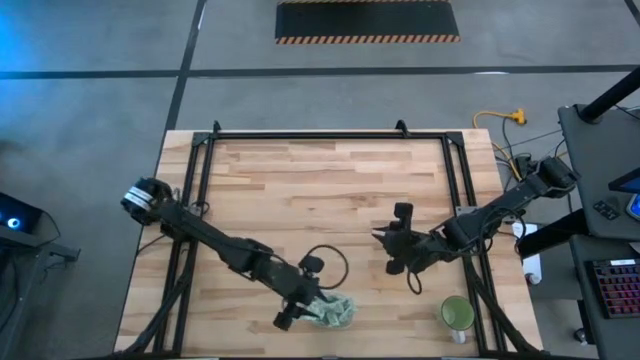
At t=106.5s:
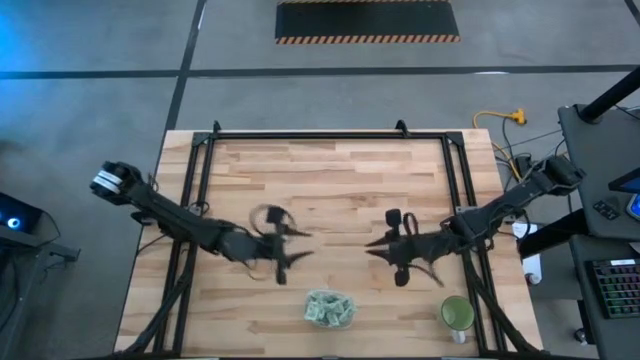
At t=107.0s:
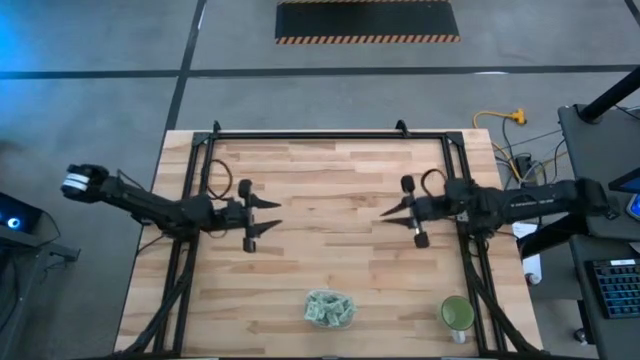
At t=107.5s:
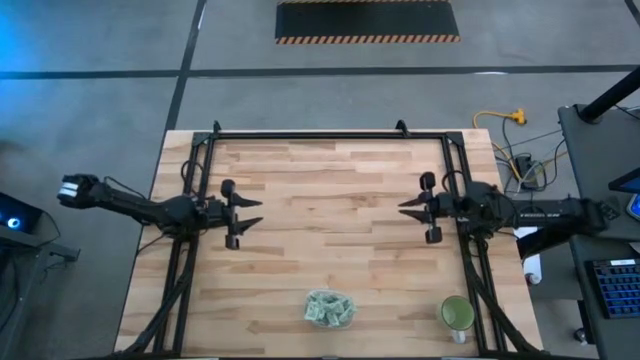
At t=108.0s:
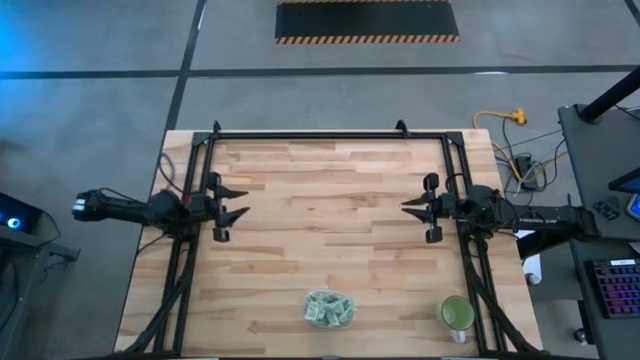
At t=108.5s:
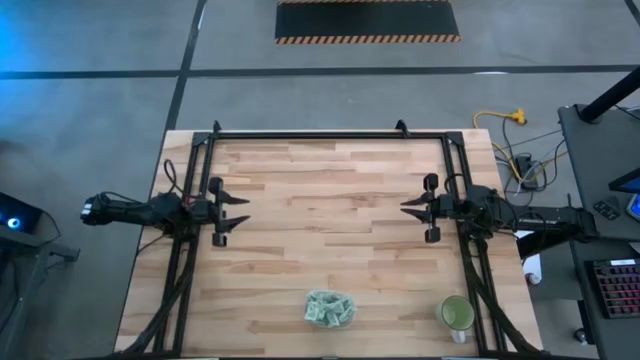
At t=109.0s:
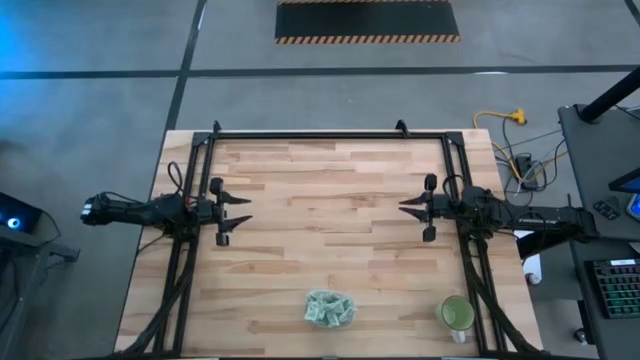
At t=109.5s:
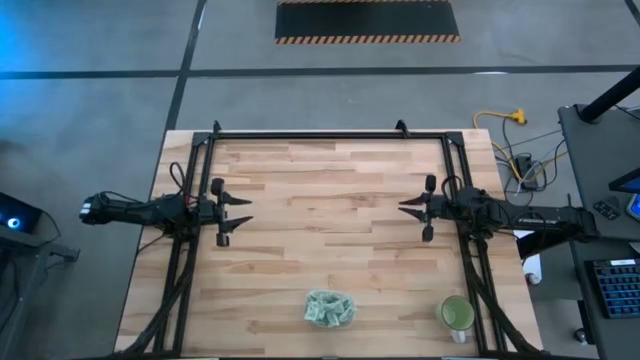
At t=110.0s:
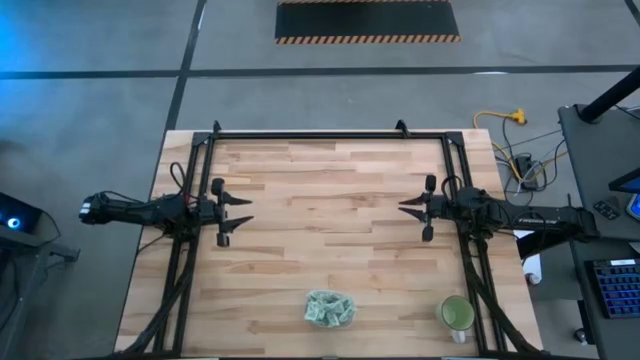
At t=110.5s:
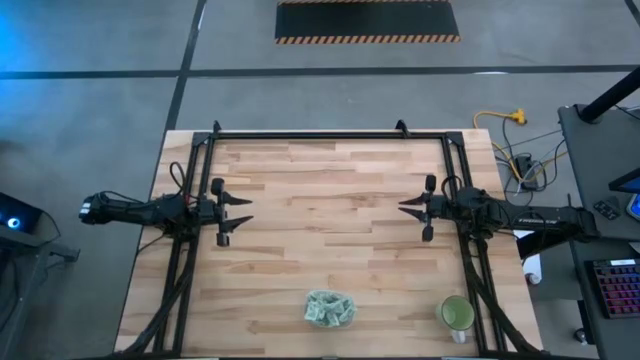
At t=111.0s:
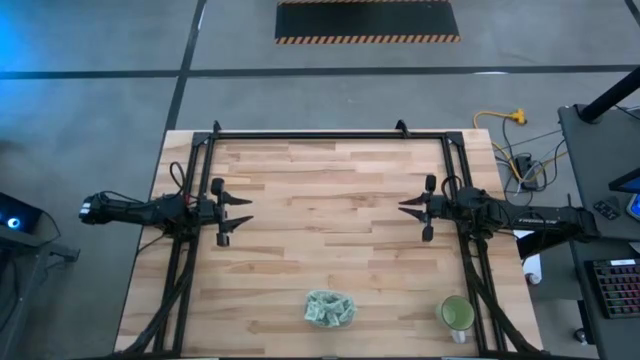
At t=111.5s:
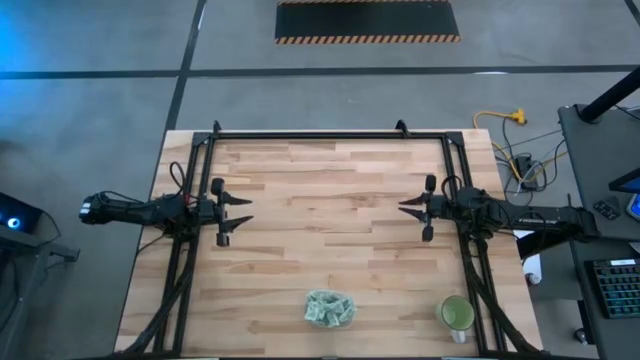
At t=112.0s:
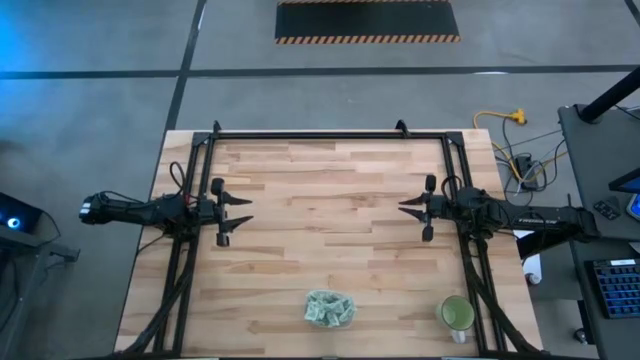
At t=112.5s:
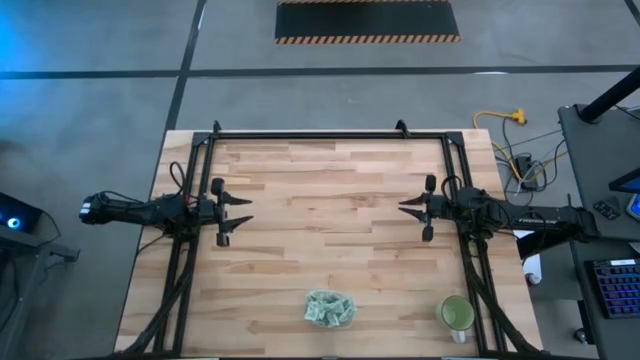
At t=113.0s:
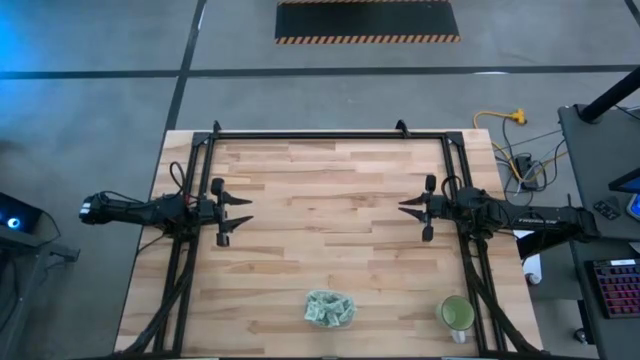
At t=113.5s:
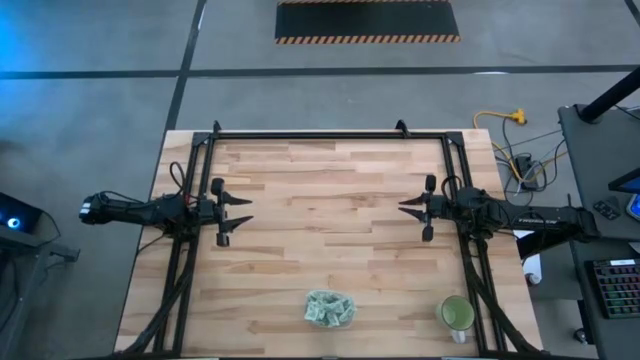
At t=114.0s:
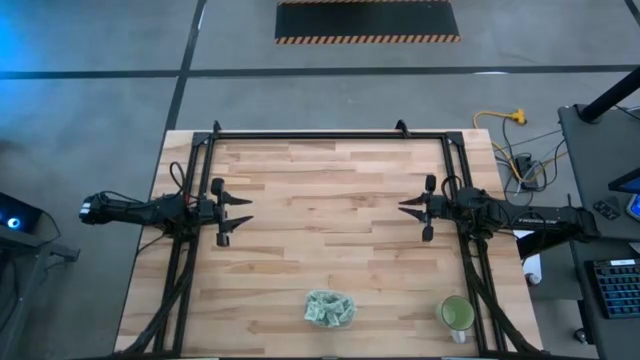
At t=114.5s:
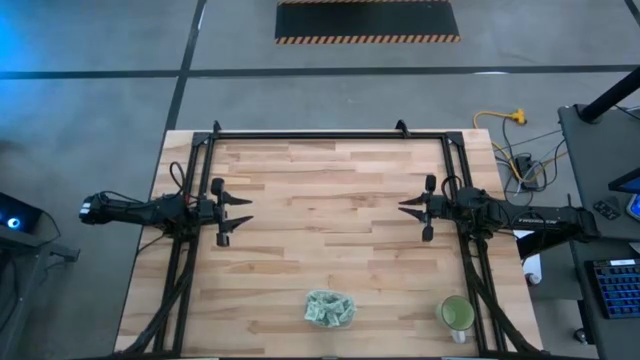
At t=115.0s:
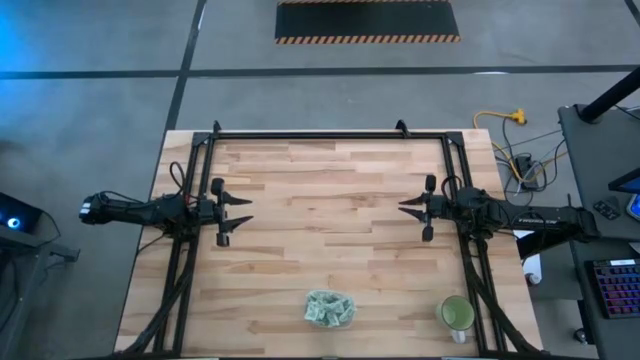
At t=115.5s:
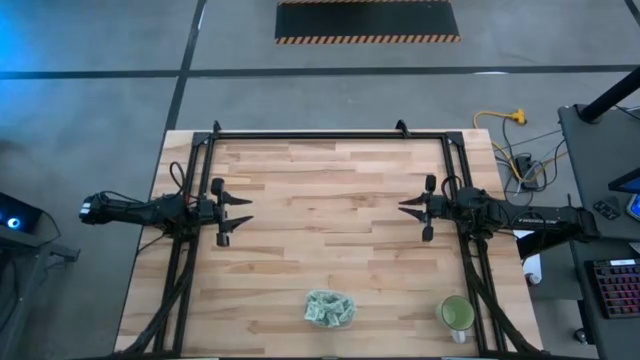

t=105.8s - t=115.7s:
Task: Pick and place Stevia / Truvia into bins
Return to Home Position

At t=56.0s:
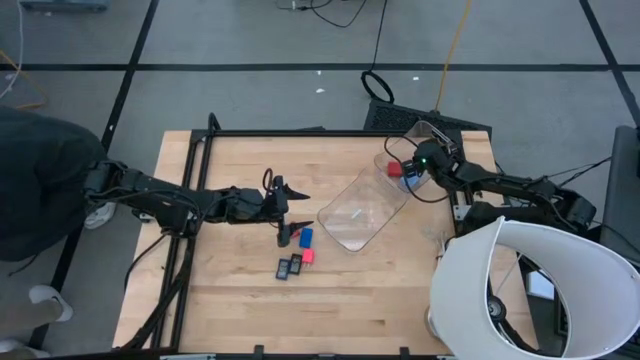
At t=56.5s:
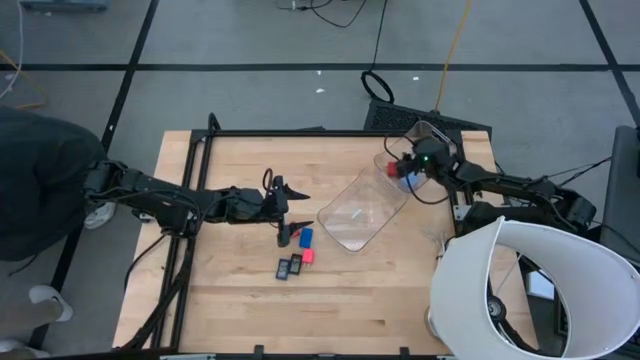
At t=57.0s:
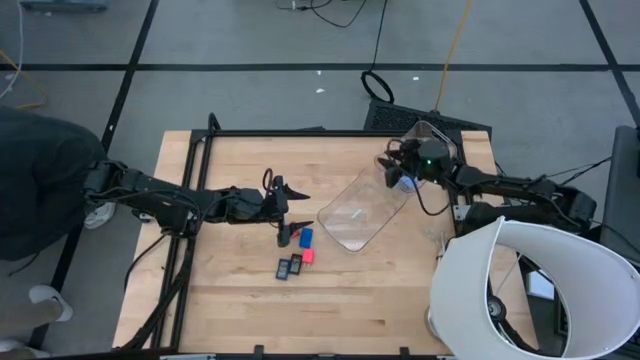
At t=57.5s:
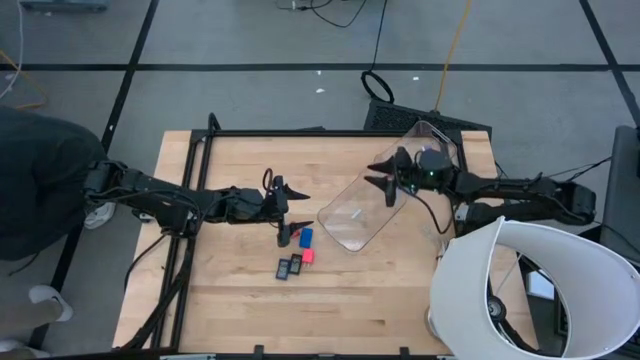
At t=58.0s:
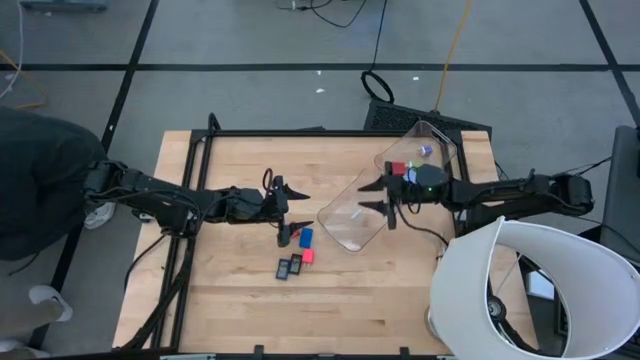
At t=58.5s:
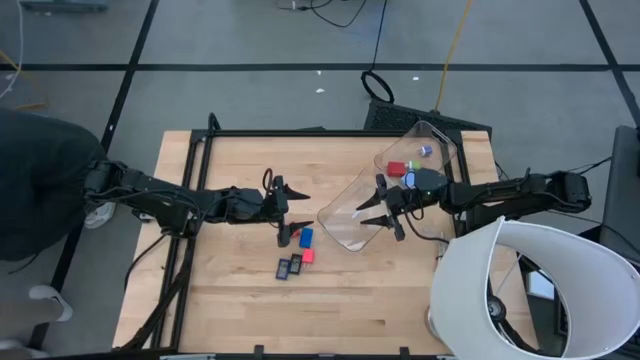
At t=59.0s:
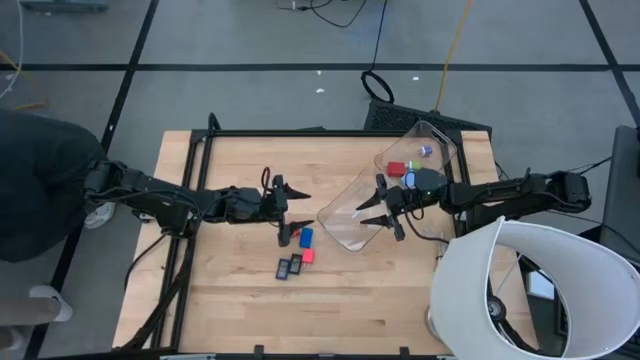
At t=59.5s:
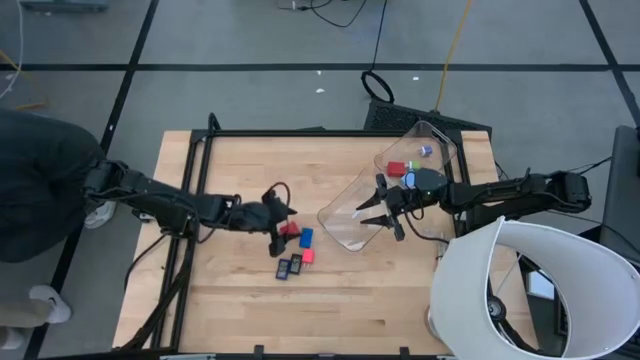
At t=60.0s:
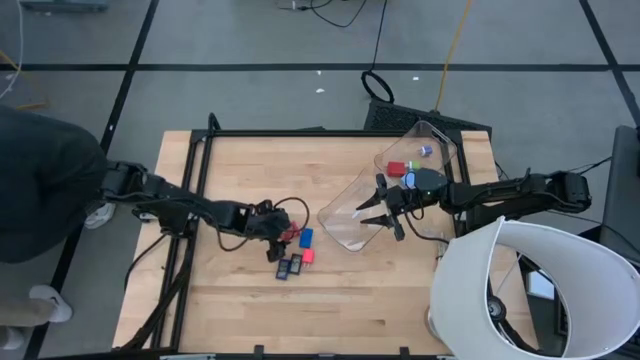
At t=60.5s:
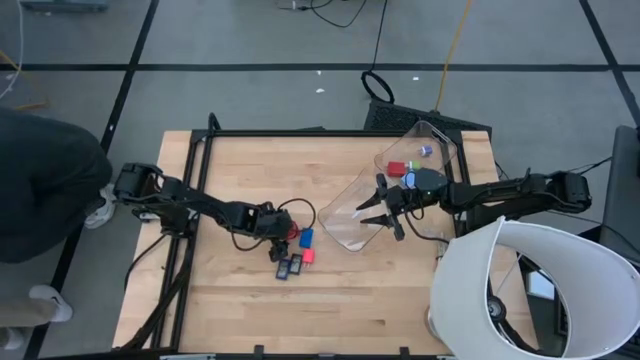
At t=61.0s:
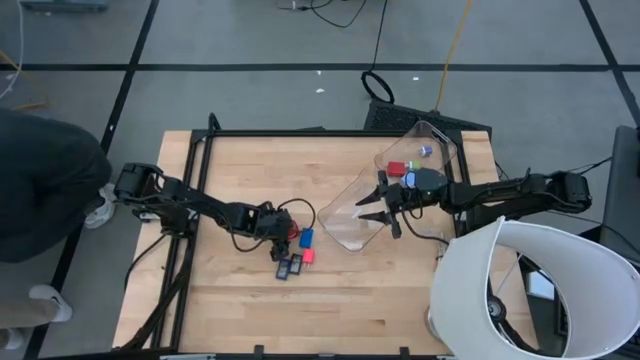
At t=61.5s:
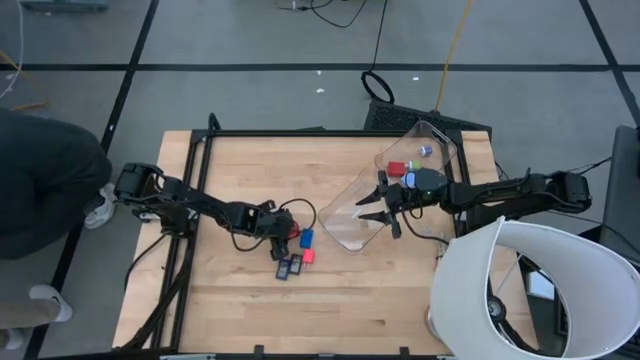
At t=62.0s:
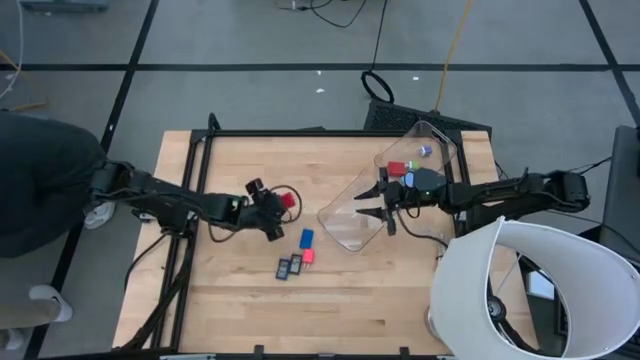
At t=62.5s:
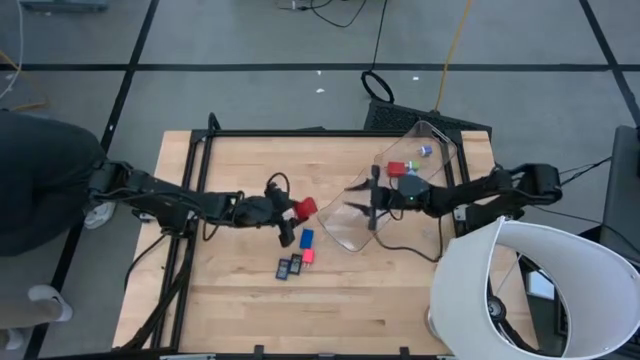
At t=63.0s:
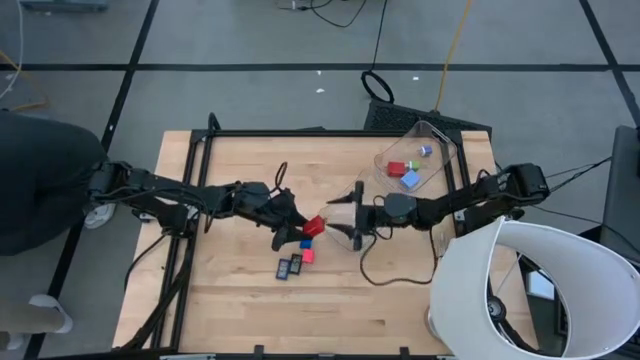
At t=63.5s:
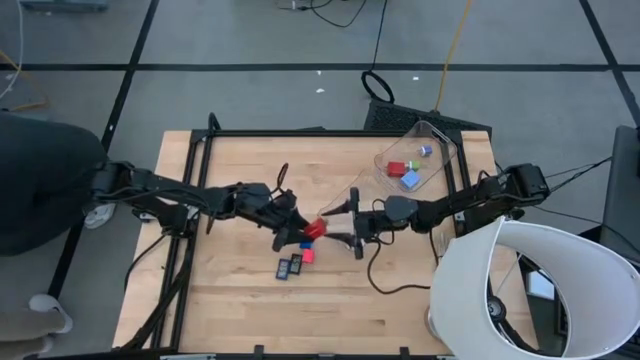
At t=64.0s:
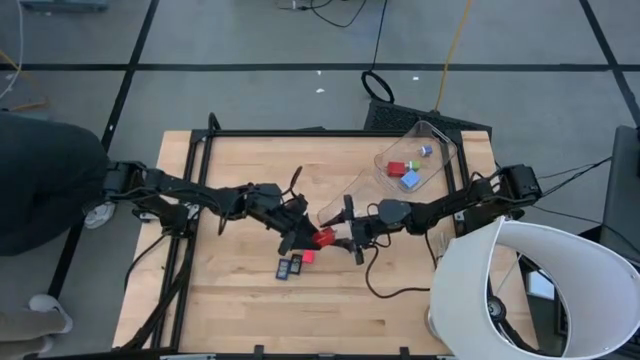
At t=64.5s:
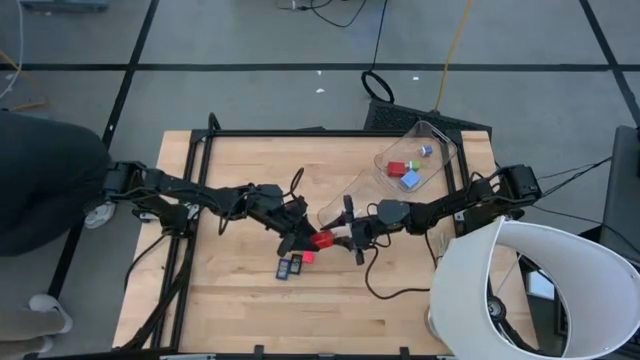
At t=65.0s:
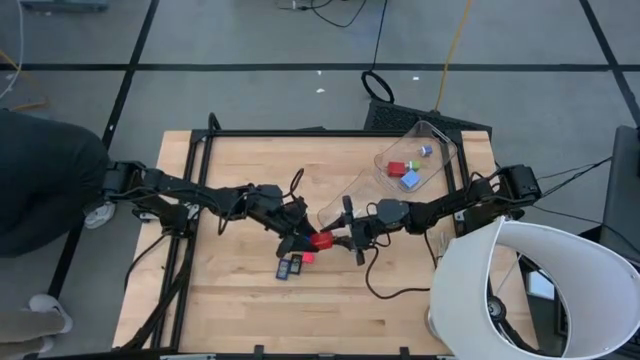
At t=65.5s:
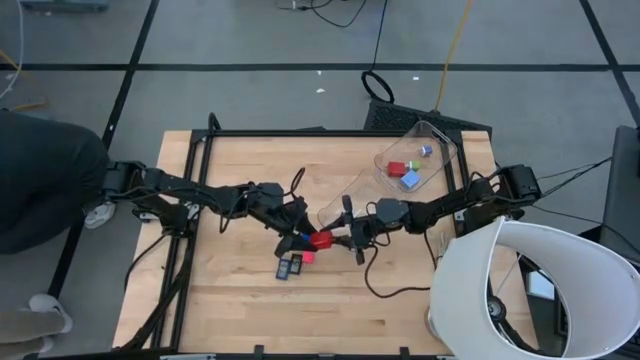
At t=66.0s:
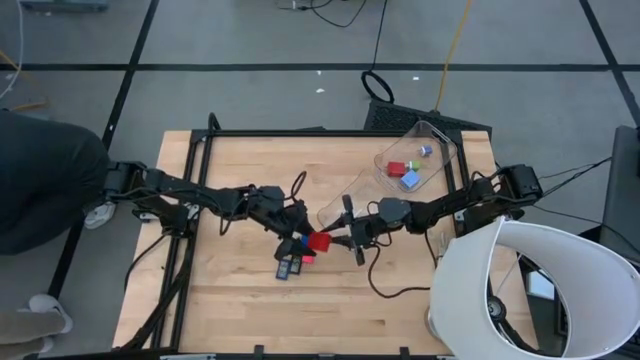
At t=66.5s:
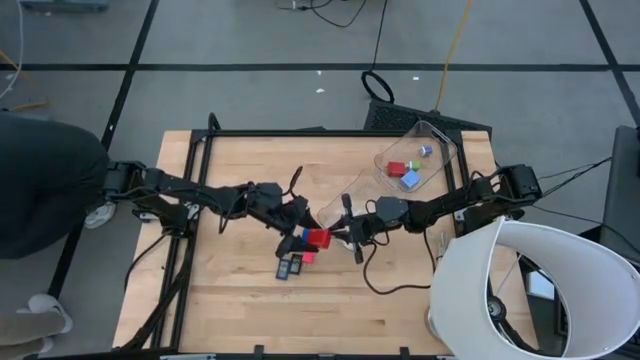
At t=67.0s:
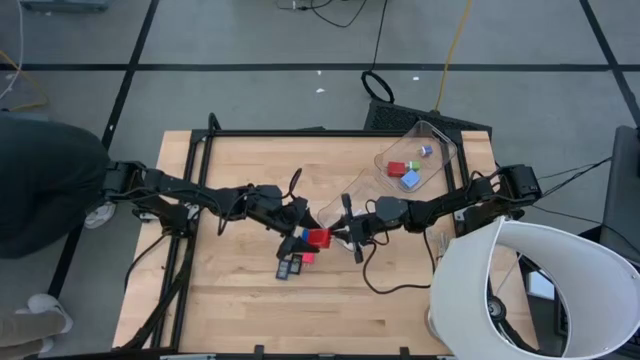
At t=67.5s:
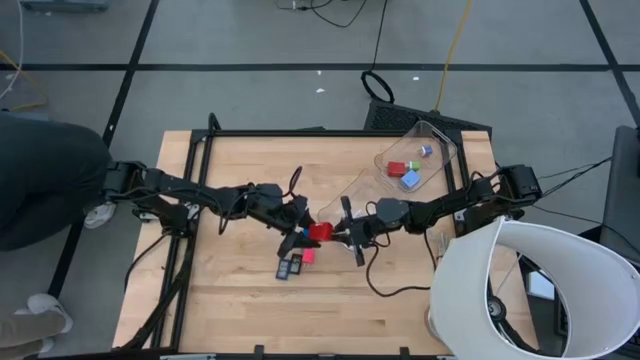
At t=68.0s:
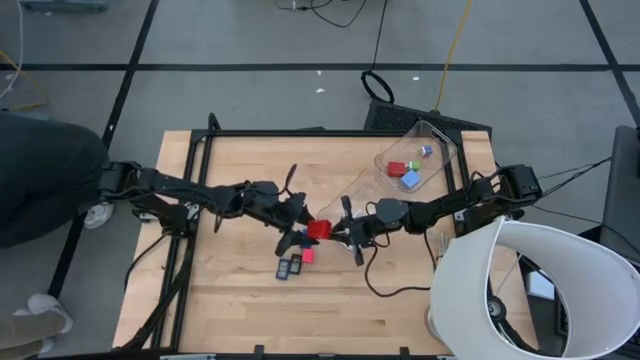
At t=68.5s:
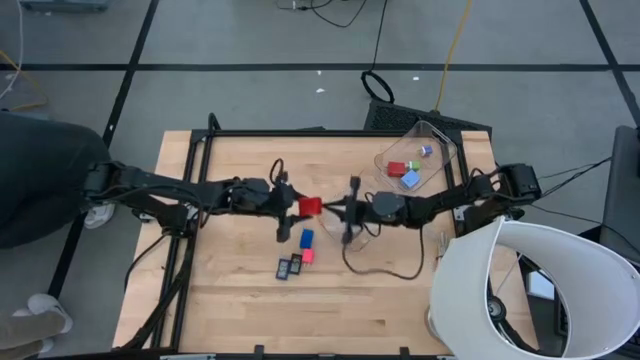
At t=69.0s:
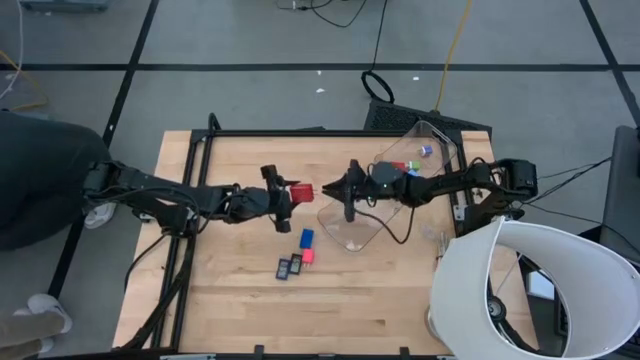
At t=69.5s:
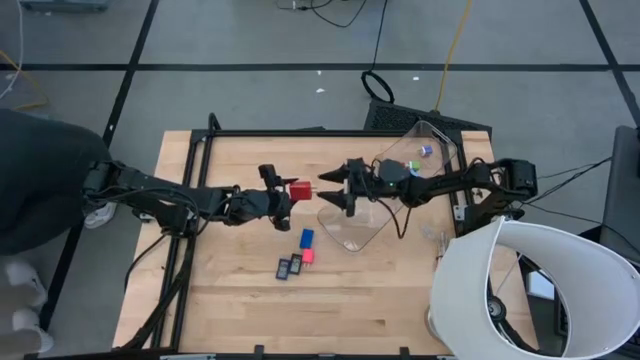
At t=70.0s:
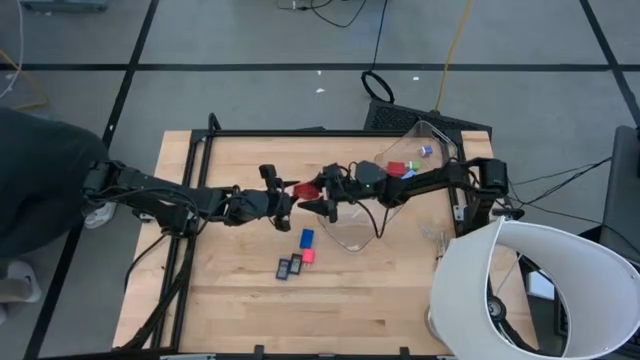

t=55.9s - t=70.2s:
Task: Pick & Place Office items
Put the red charger adapter into the right transparent bin
